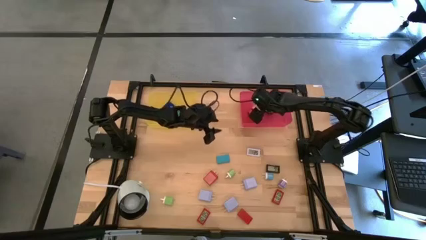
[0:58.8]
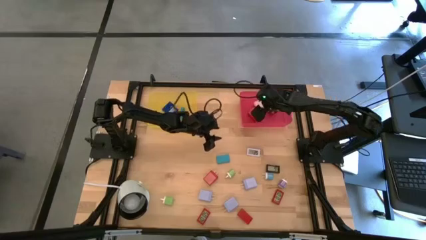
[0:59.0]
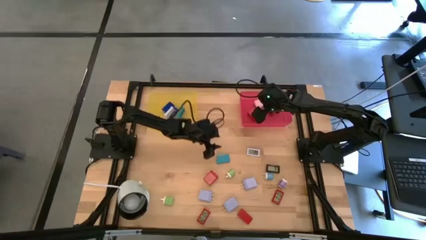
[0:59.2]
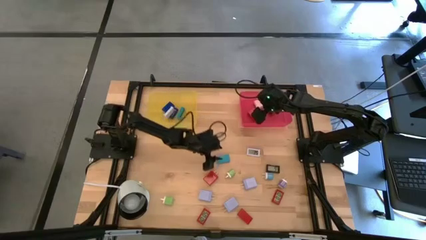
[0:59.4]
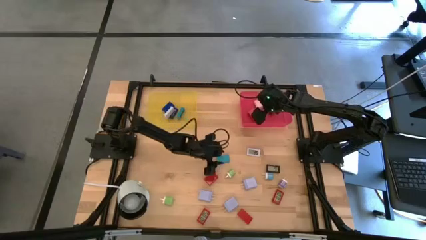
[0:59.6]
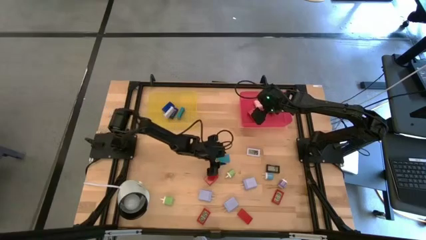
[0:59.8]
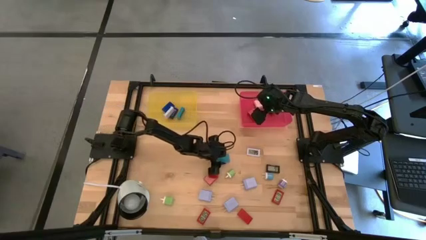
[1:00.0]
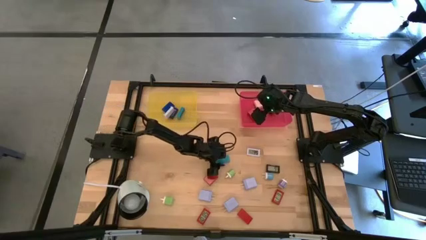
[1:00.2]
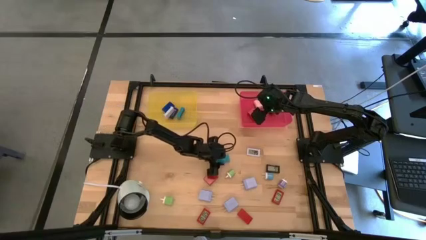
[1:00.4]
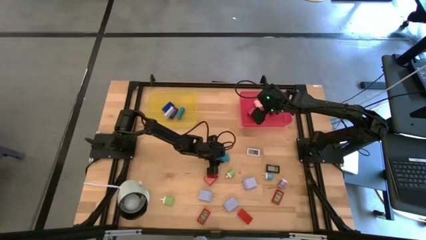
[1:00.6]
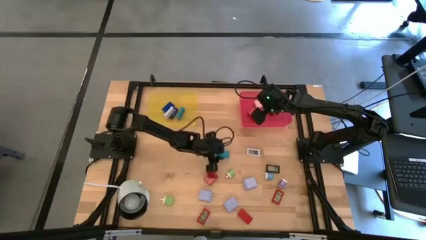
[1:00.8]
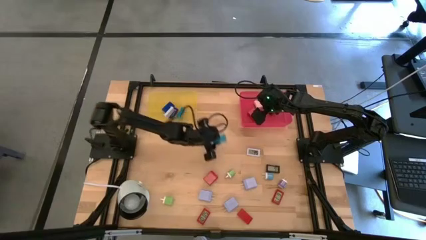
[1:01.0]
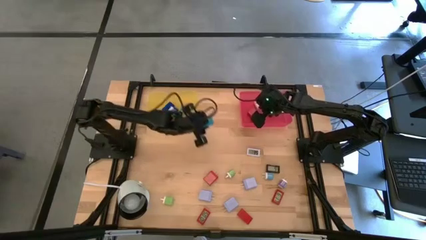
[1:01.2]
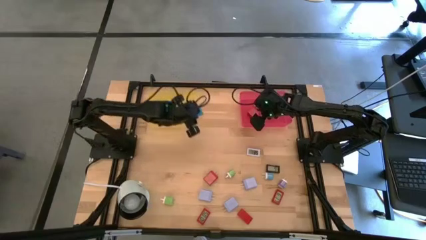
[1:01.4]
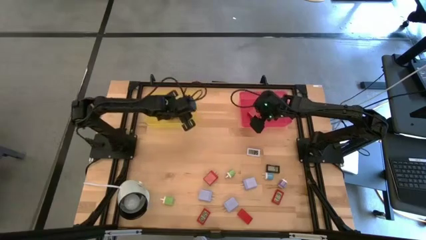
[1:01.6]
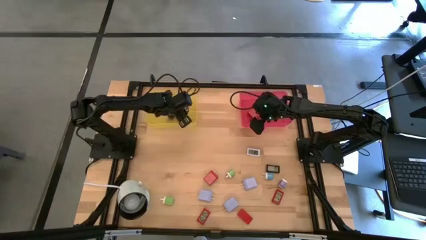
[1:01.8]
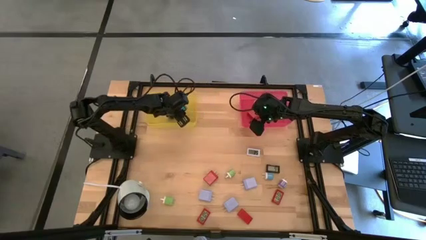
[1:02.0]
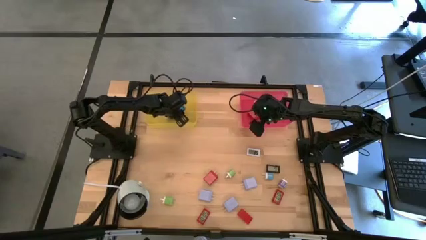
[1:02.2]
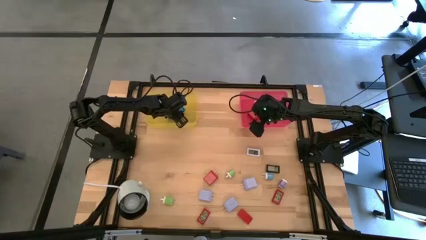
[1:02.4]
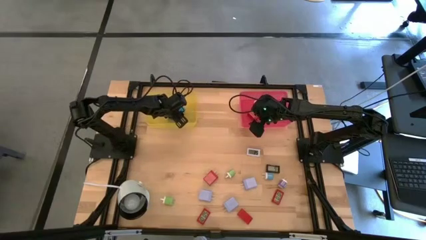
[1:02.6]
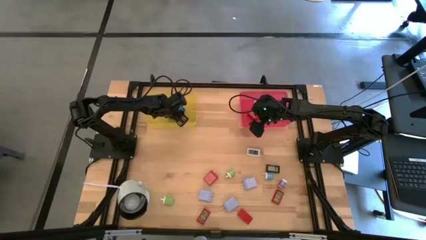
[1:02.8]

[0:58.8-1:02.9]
Task: Pick & Place Office items
Put the light blue digital clock into the yellow bin

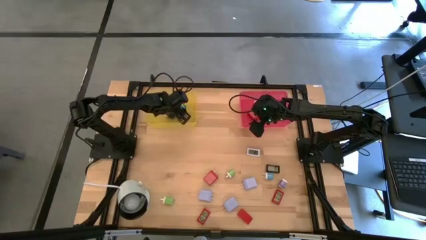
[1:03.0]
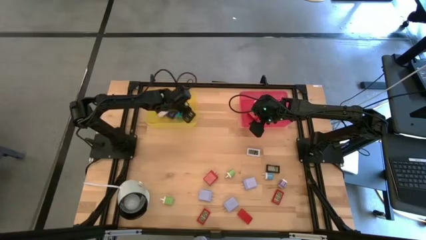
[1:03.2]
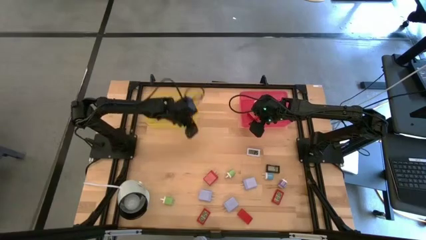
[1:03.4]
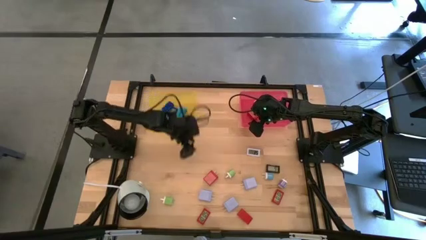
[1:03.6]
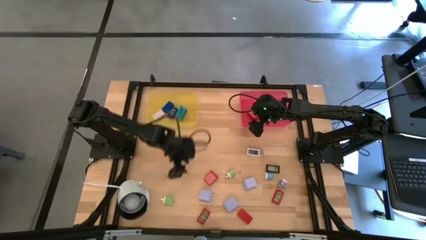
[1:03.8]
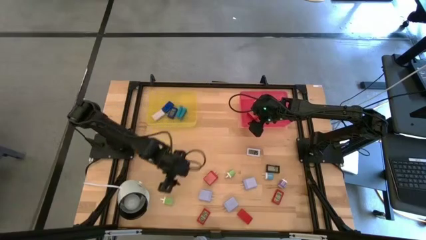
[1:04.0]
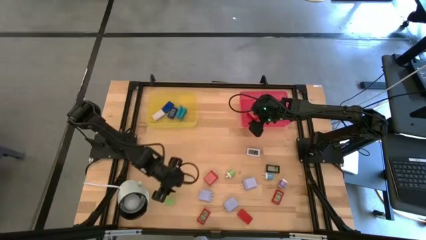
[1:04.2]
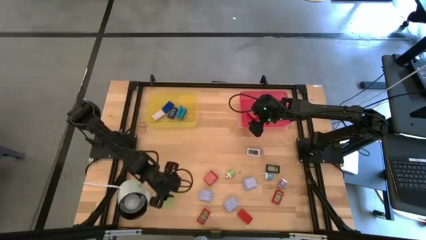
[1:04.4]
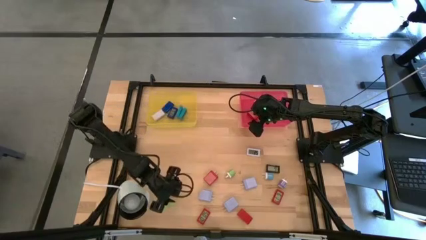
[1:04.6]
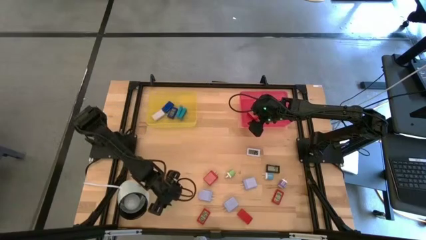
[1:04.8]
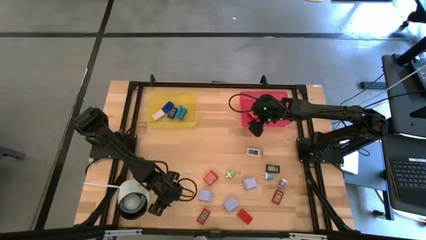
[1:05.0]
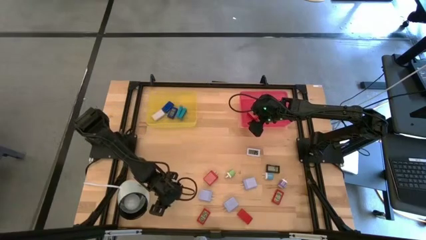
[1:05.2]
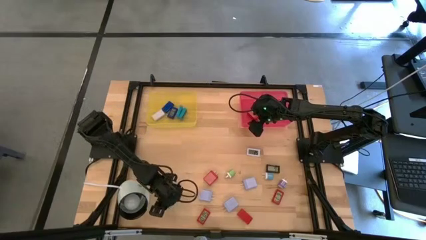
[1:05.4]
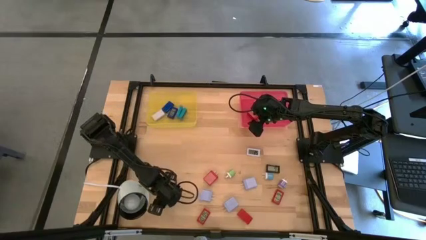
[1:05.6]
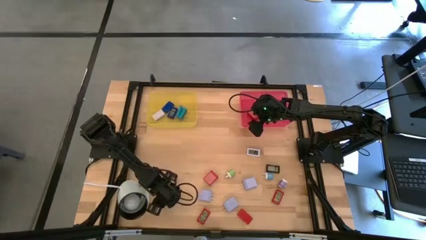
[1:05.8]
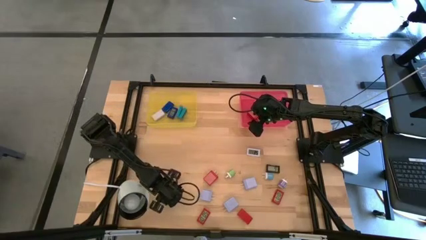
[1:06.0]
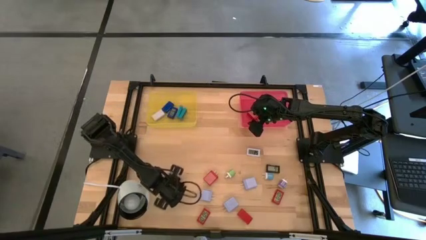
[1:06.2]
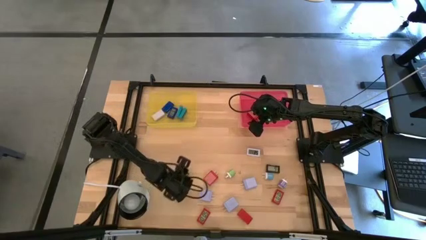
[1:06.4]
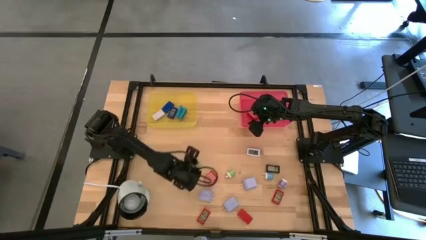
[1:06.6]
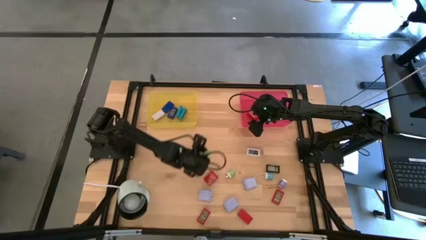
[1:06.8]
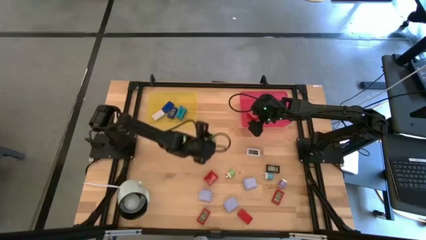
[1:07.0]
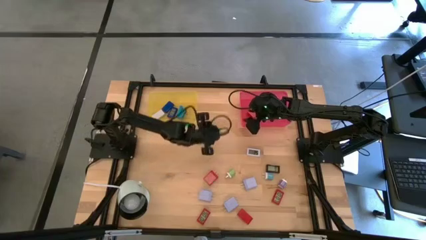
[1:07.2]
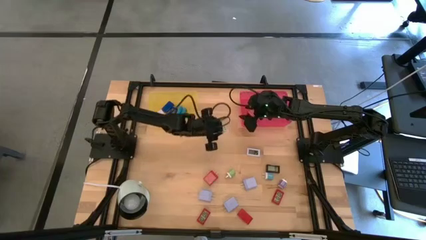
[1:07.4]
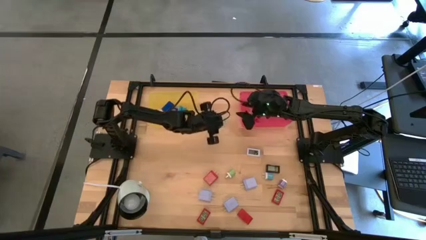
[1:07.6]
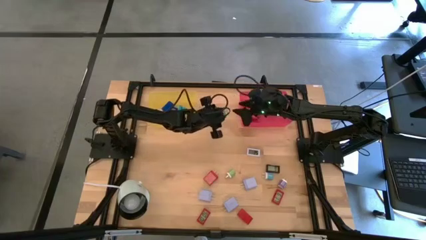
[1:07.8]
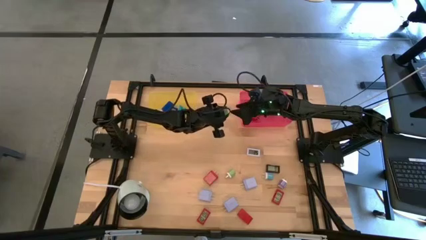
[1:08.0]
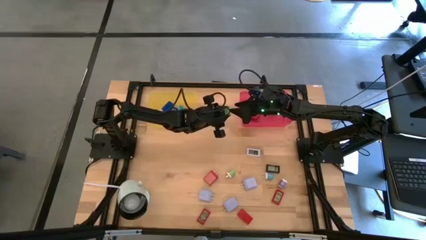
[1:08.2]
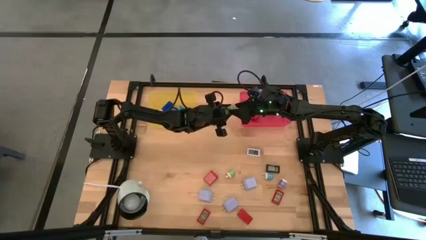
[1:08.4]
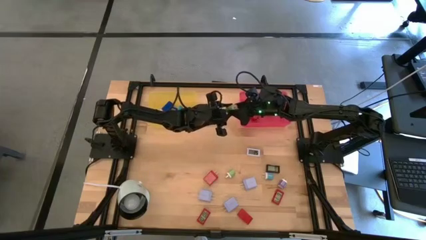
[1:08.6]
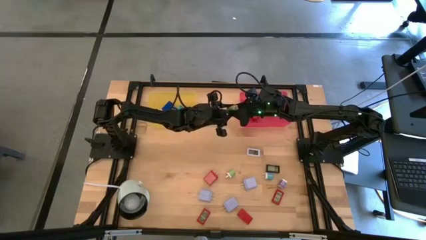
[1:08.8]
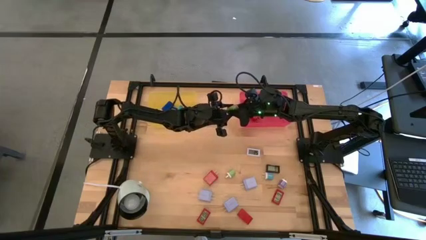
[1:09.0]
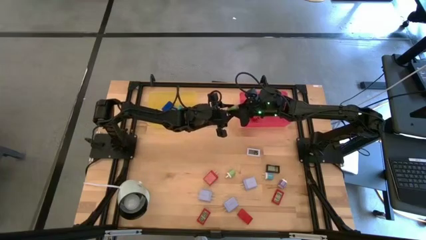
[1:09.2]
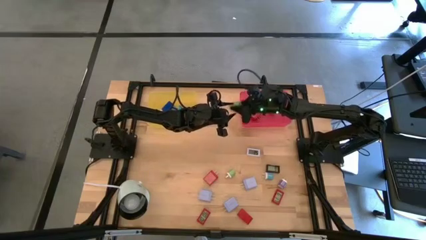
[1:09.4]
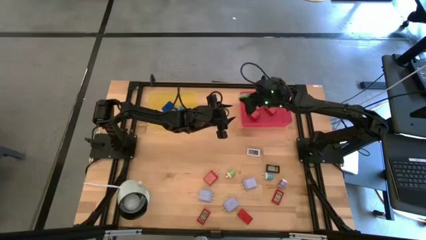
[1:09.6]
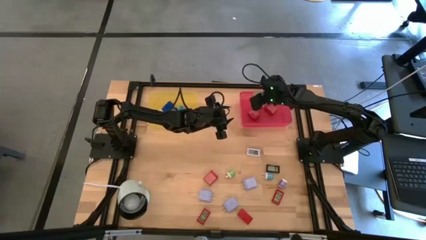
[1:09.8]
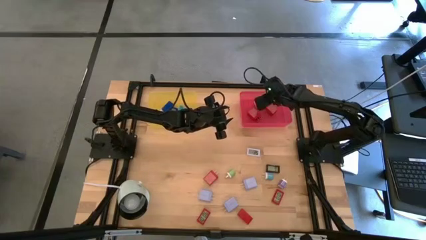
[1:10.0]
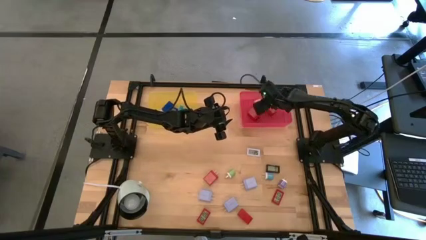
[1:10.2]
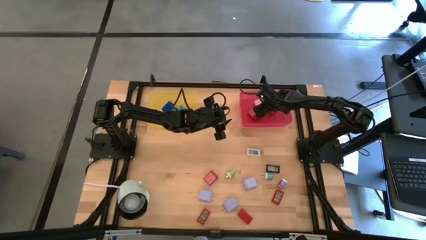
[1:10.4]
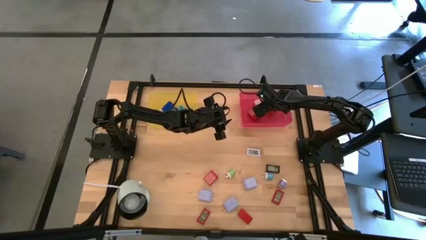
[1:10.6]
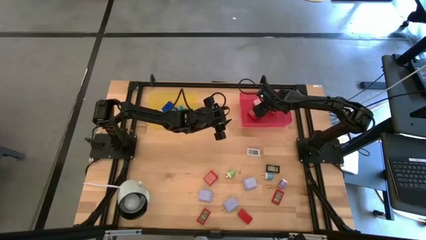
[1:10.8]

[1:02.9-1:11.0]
Put the green charger adapter into the red bin
